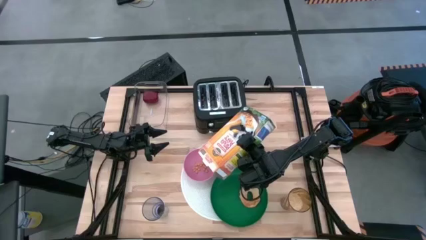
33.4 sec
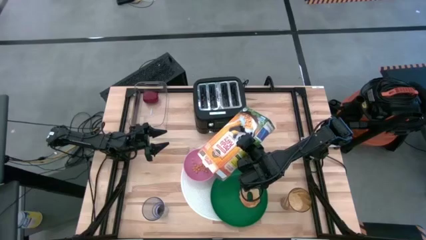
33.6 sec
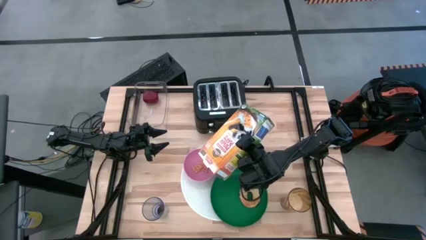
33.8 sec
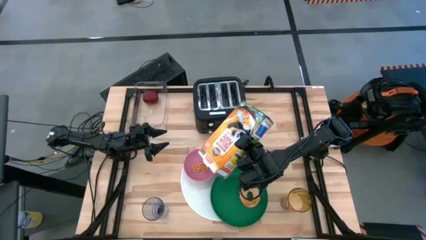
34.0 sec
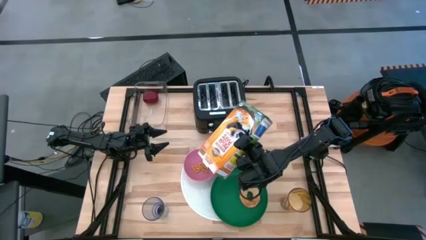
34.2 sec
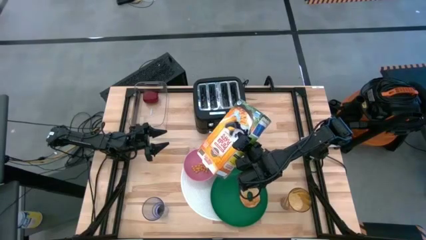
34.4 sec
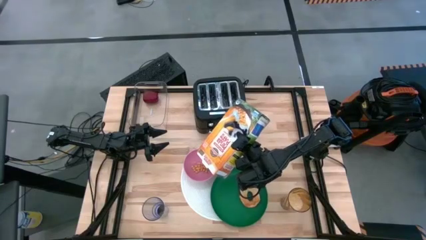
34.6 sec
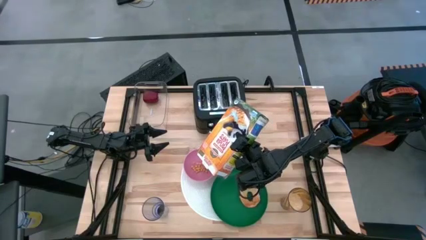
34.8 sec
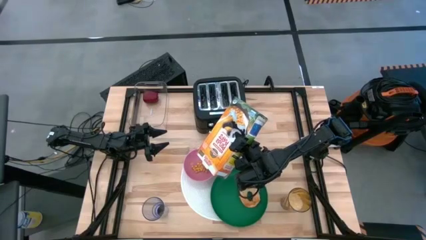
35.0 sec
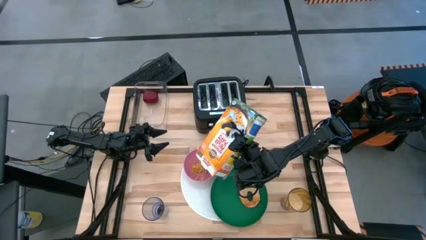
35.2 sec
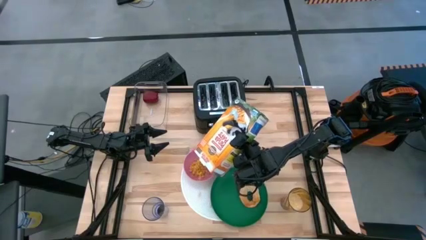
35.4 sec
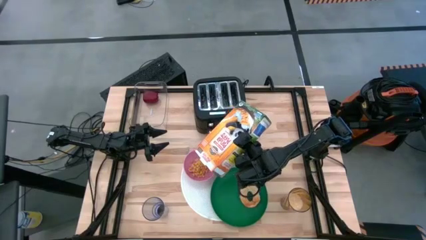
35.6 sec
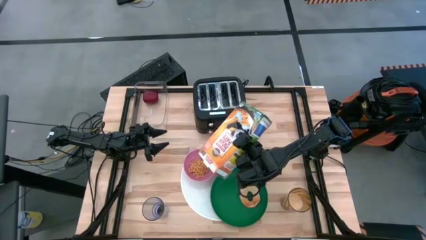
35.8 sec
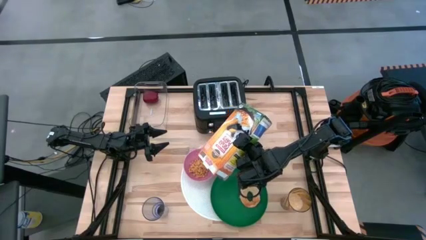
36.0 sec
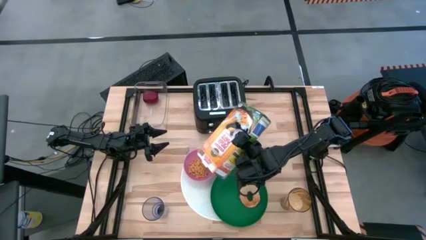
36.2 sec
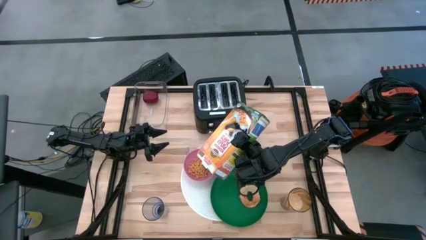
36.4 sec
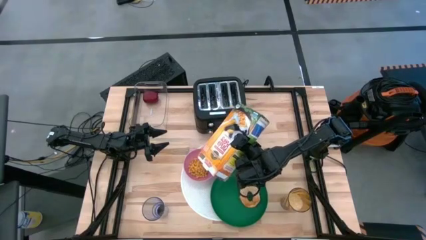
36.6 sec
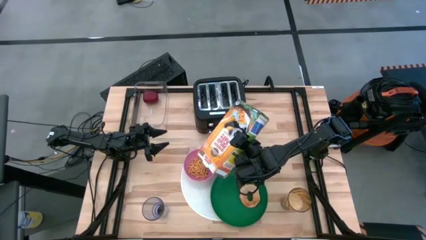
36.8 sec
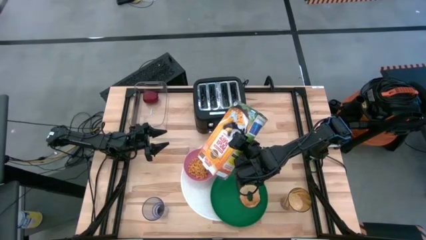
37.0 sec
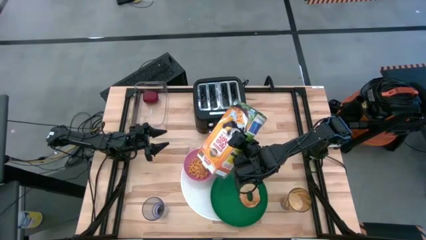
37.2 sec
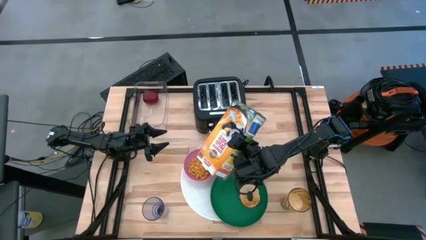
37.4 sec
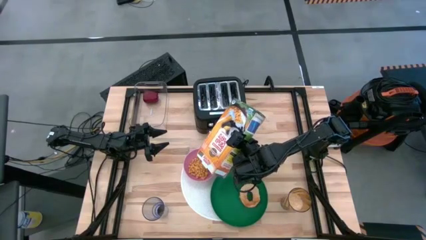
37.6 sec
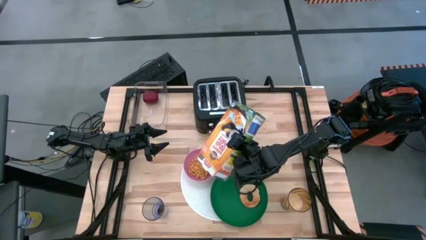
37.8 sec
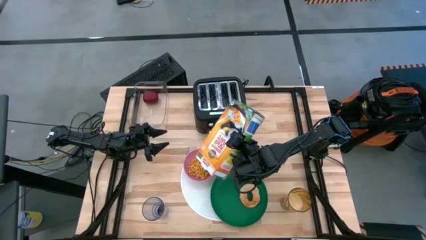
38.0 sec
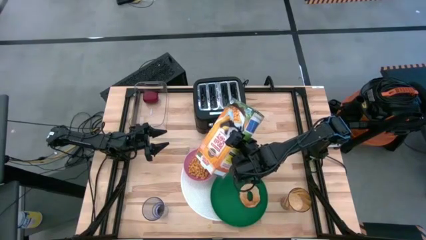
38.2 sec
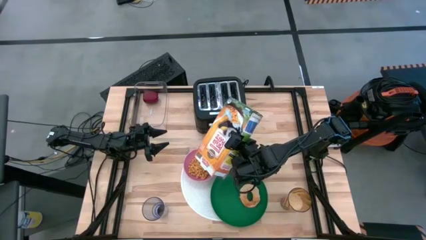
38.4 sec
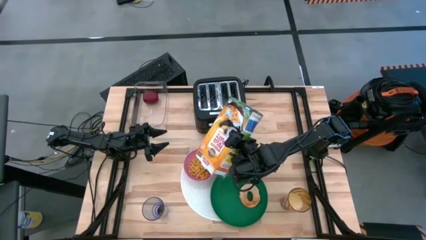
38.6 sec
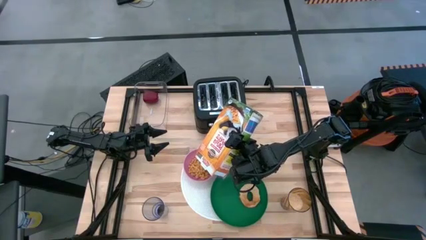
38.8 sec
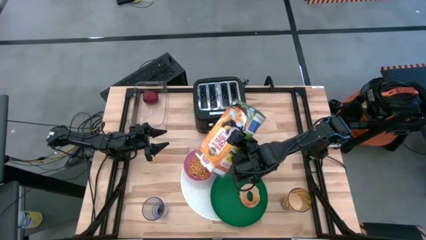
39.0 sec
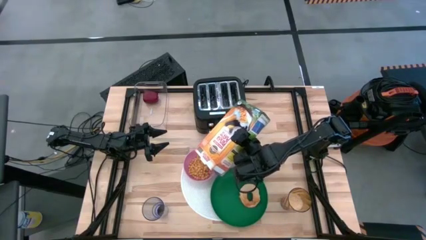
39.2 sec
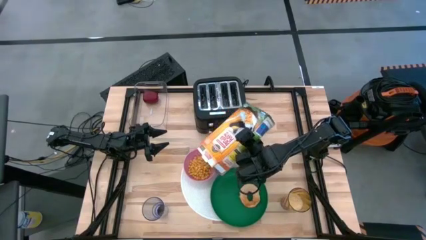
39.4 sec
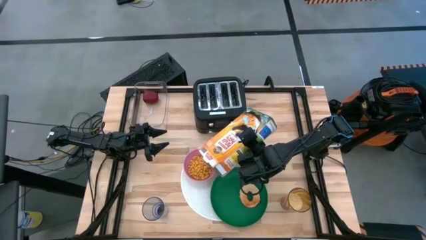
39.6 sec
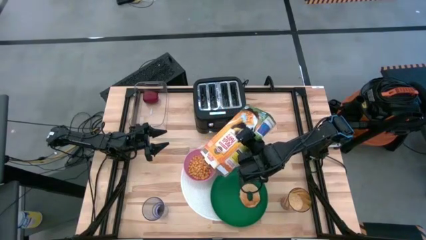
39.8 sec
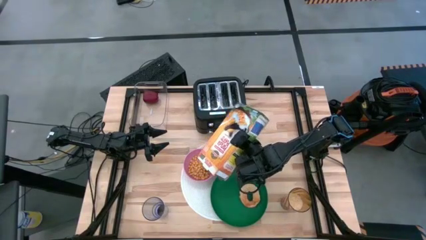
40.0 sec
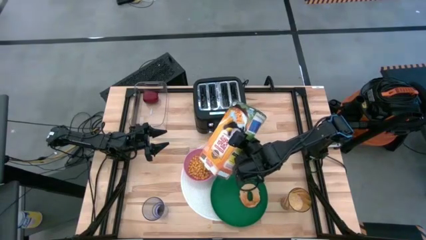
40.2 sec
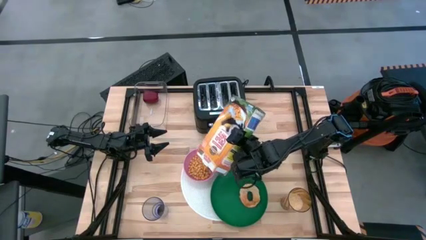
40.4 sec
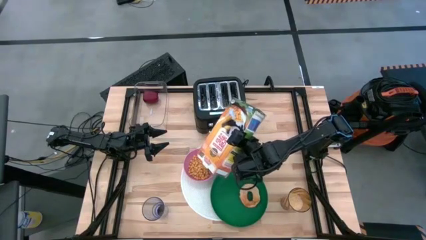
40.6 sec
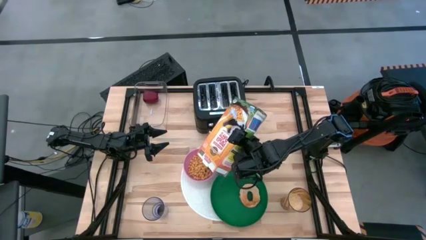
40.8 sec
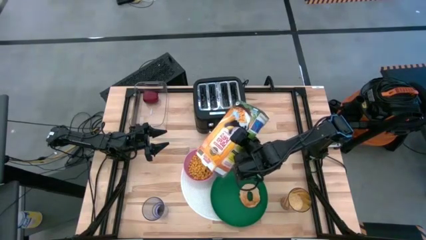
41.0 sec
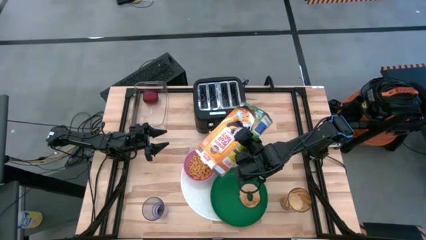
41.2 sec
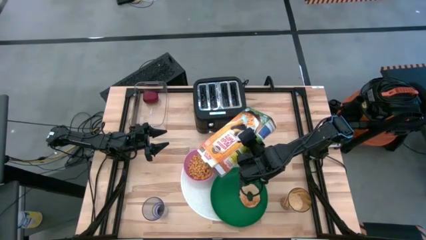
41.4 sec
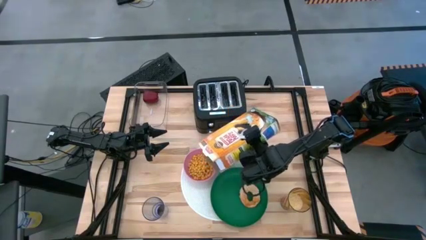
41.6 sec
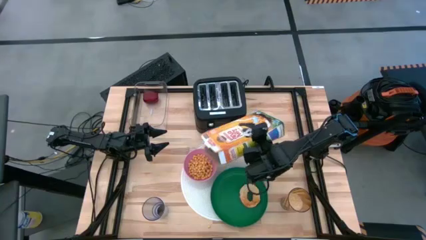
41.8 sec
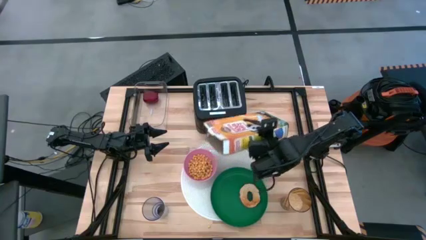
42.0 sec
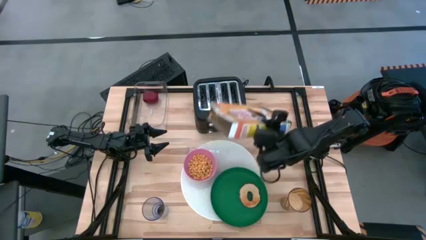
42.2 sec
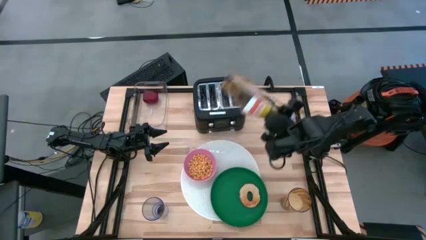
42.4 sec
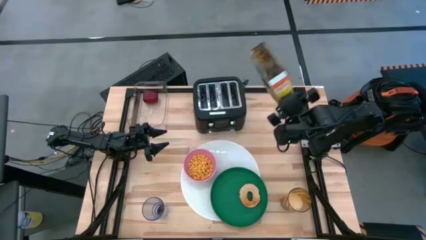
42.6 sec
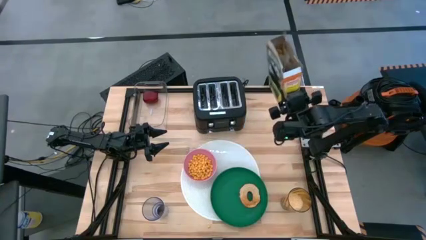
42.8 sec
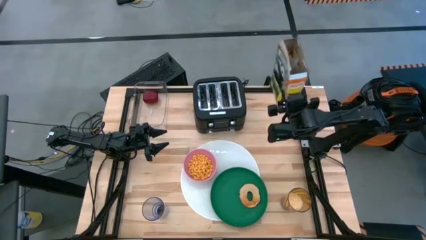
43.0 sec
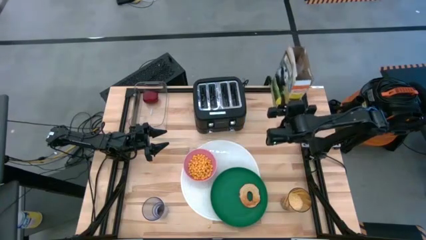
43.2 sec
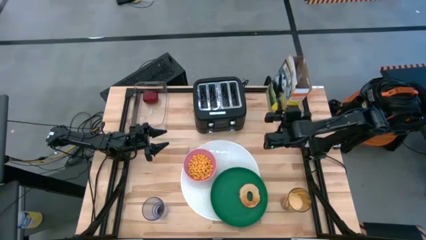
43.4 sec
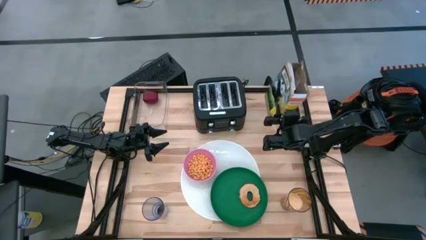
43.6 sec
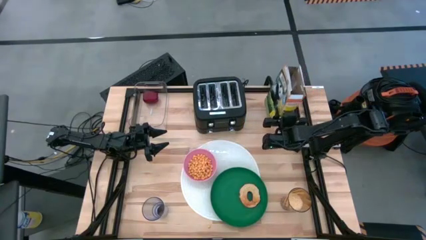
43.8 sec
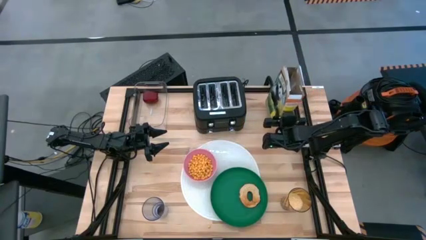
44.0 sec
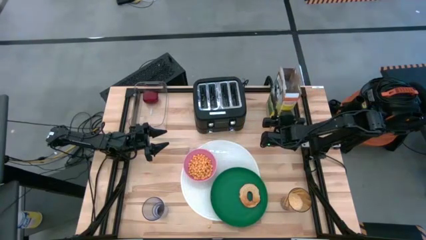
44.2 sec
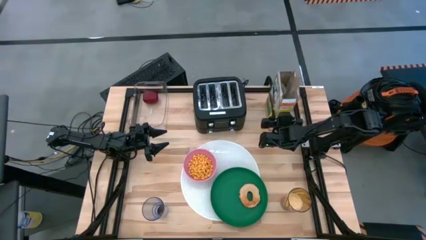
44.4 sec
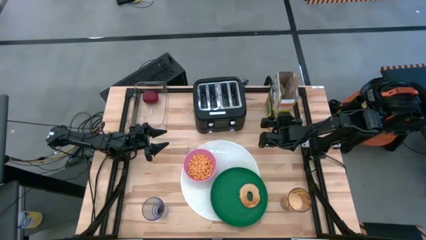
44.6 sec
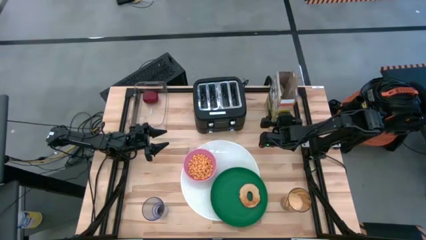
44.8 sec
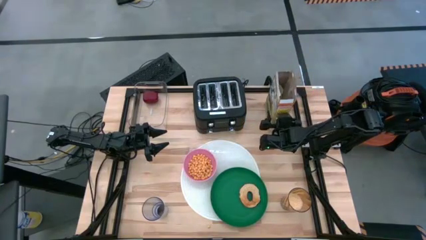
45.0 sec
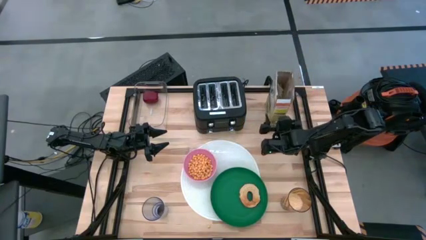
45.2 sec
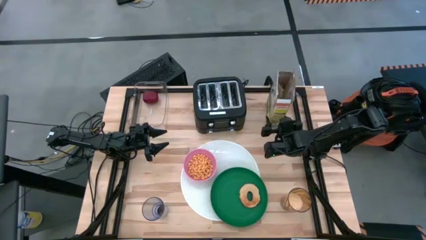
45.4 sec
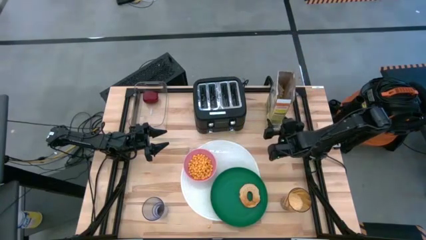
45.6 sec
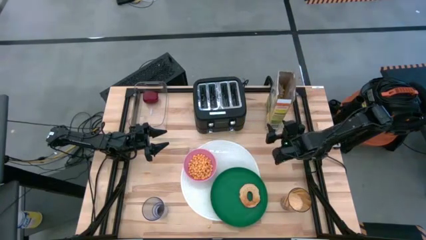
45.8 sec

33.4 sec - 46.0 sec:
Task: Arrange a breakfast setting
Pour the cereal from the cereal box into the pink bowl

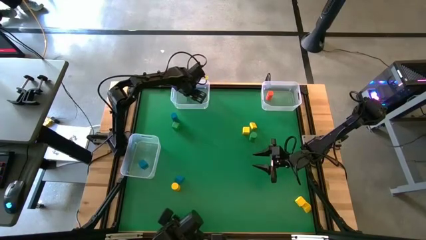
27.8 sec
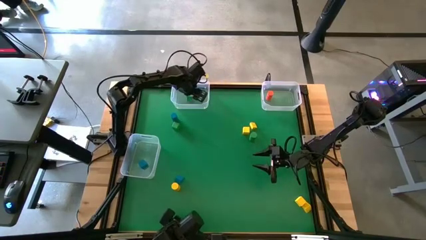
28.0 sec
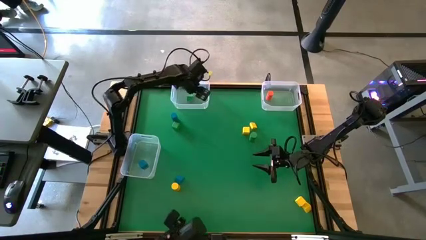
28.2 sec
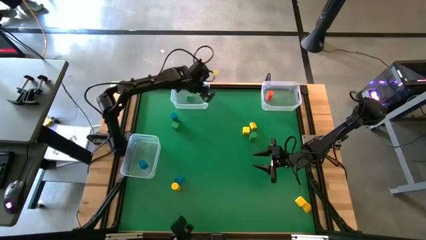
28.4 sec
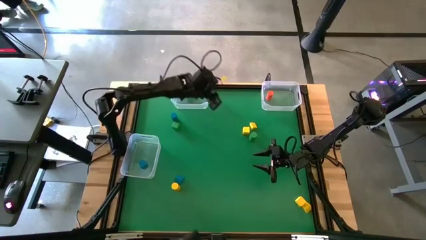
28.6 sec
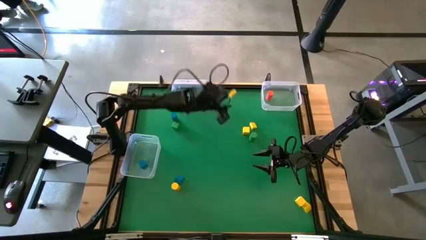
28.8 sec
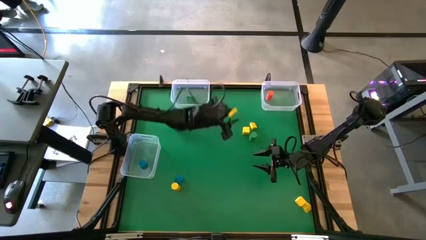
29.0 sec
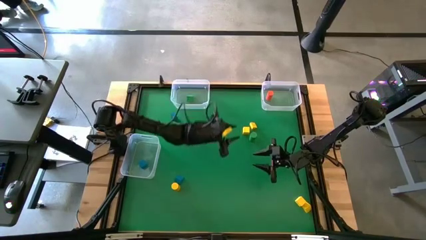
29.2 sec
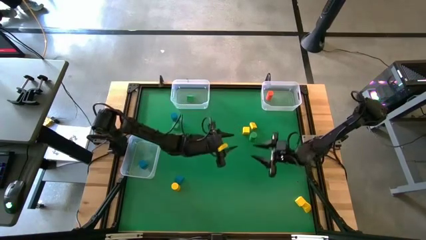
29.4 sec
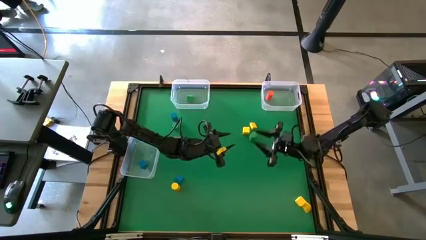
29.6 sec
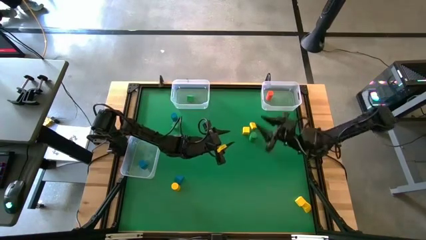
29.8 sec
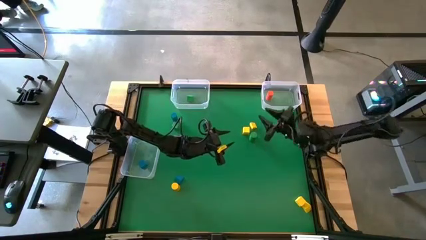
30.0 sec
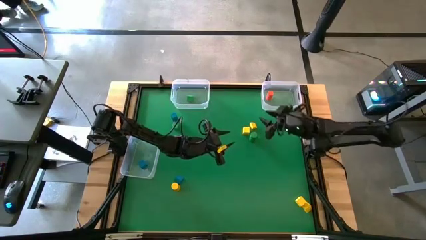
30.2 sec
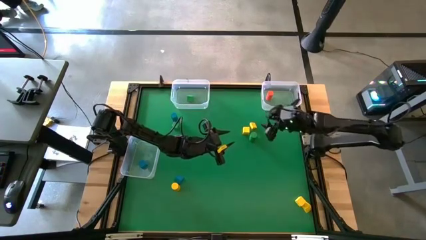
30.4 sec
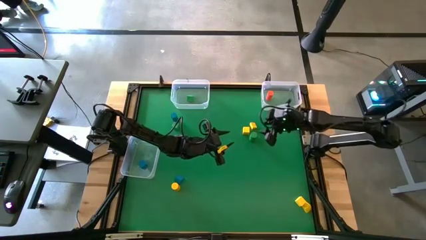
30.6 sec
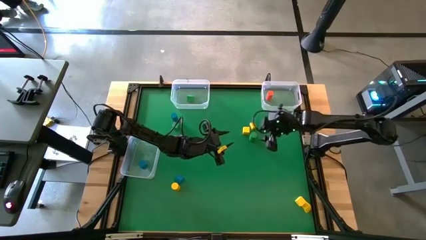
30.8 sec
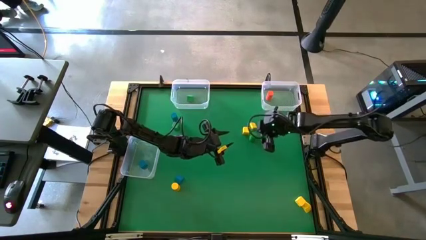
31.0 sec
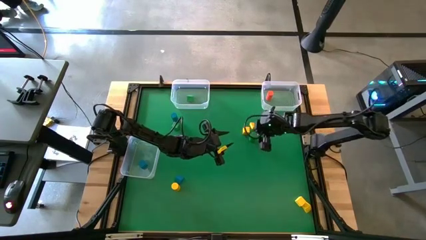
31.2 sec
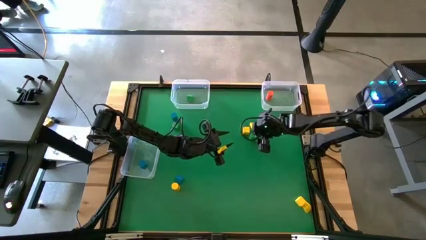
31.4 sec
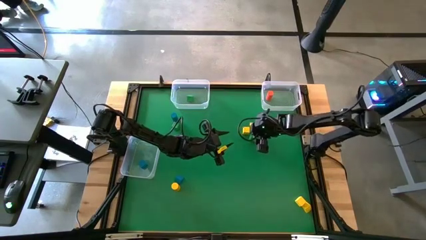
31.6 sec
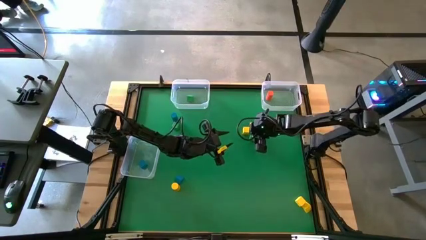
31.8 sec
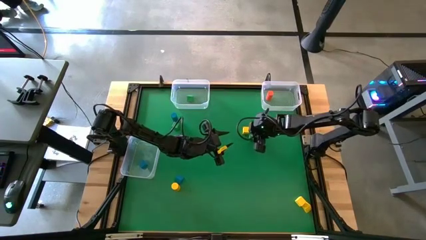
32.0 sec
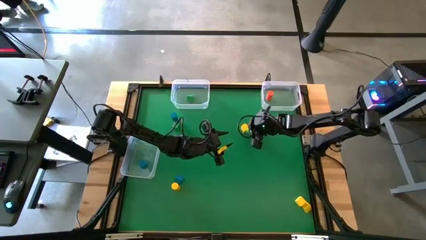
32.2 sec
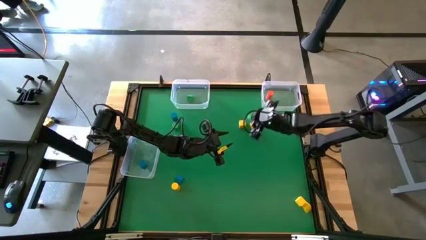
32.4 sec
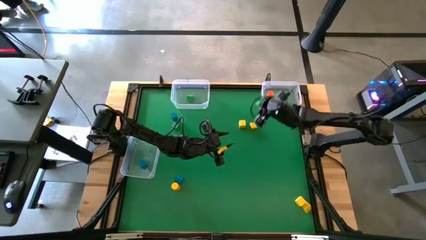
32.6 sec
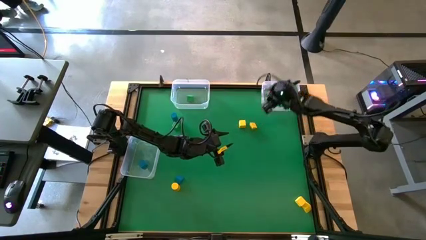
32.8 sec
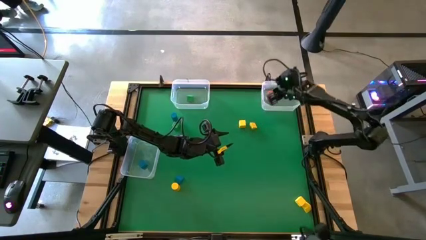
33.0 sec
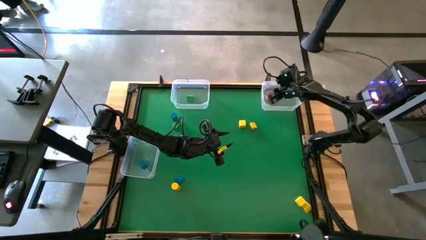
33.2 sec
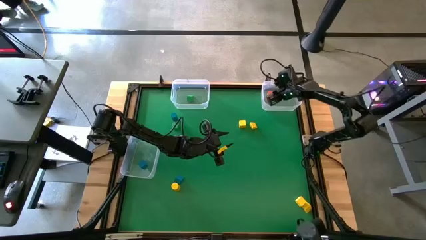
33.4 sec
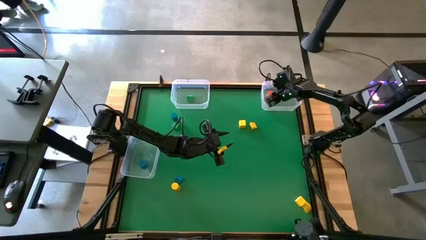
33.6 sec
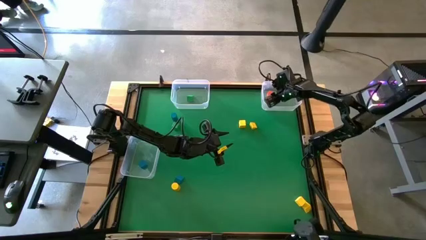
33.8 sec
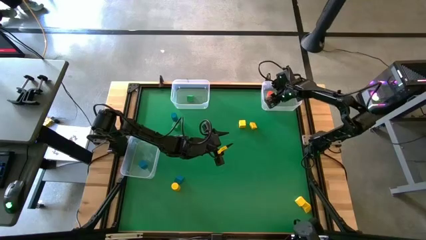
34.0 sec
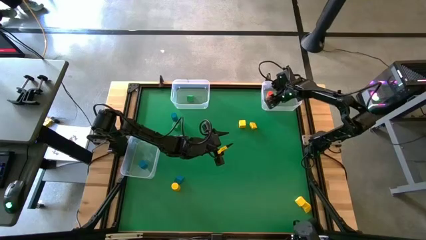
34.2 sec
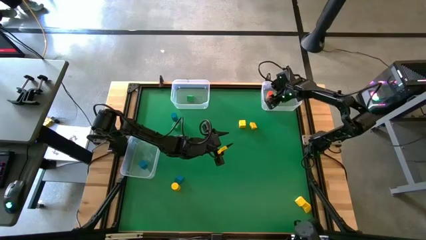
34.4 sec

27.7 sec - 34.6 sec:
Task: Sort blocks by size
Put the green cylindrical block into the top right transparent bin
